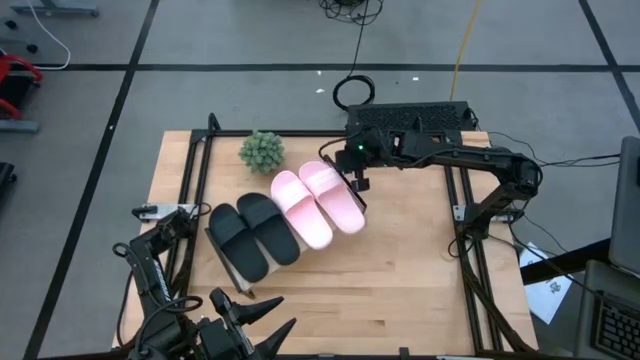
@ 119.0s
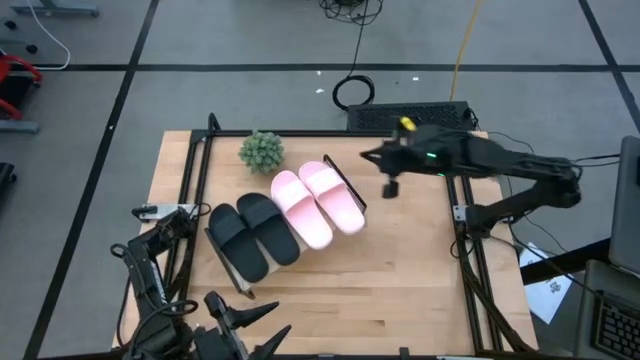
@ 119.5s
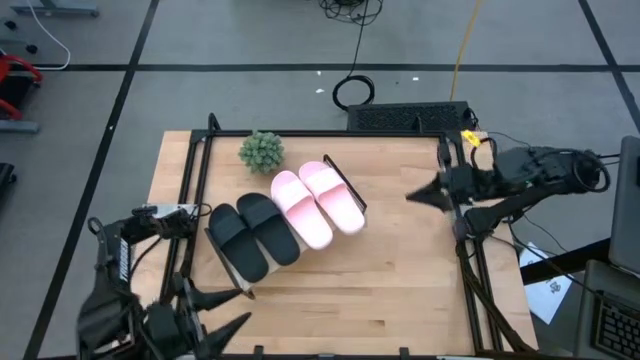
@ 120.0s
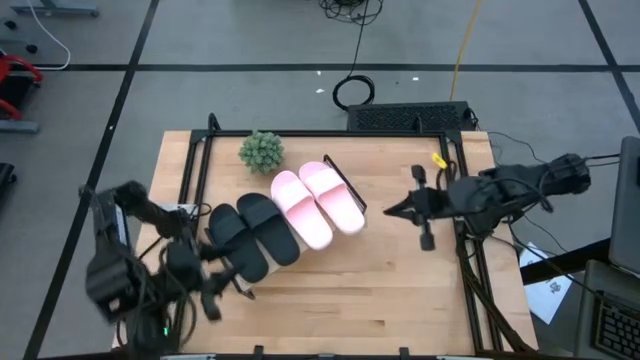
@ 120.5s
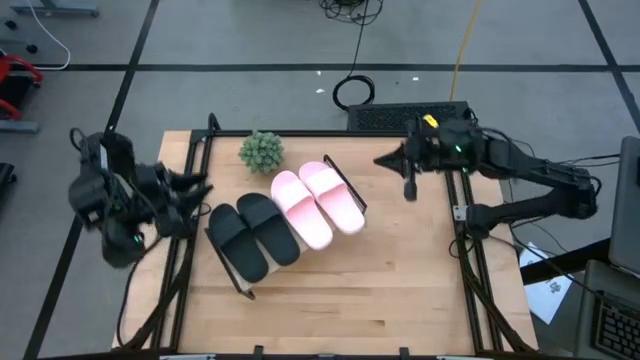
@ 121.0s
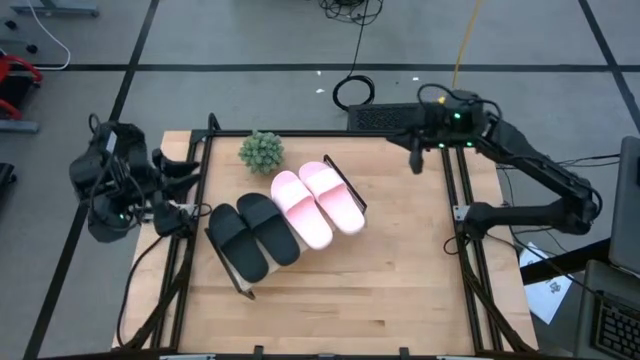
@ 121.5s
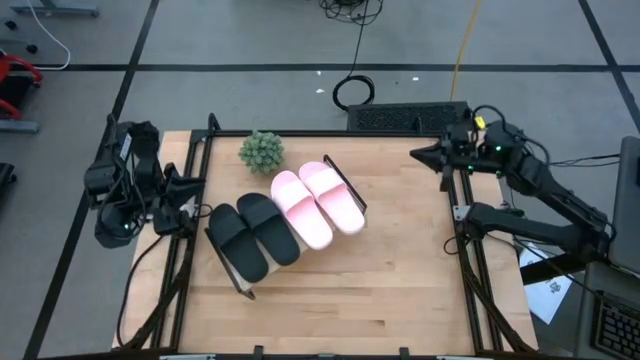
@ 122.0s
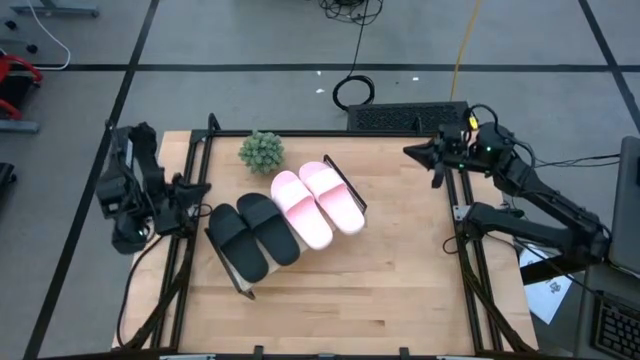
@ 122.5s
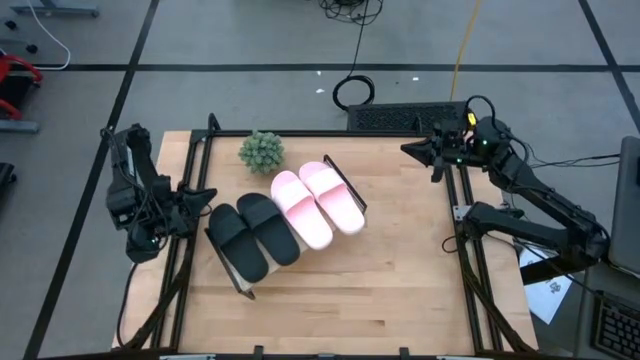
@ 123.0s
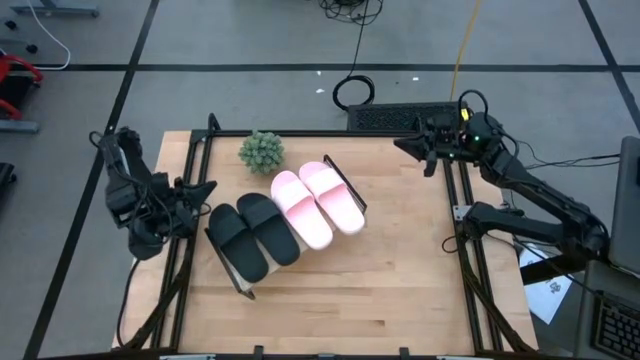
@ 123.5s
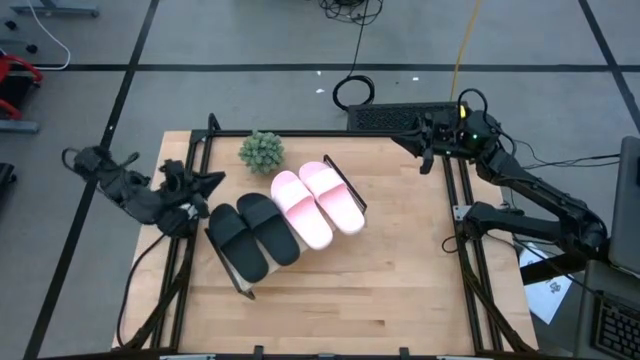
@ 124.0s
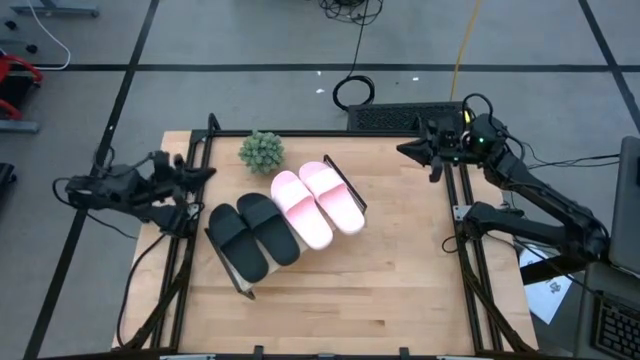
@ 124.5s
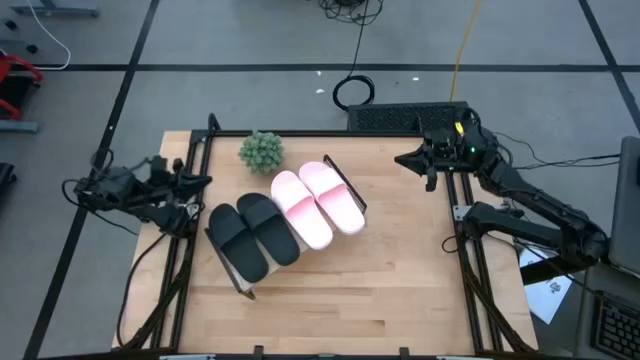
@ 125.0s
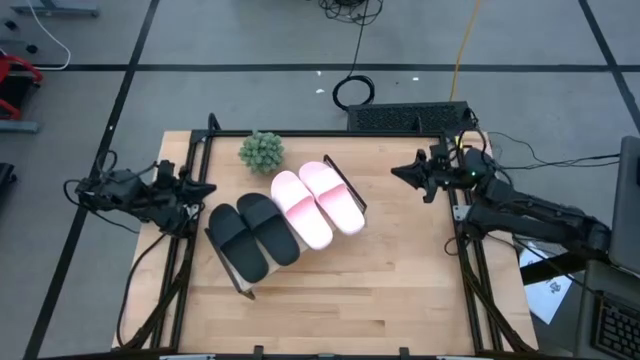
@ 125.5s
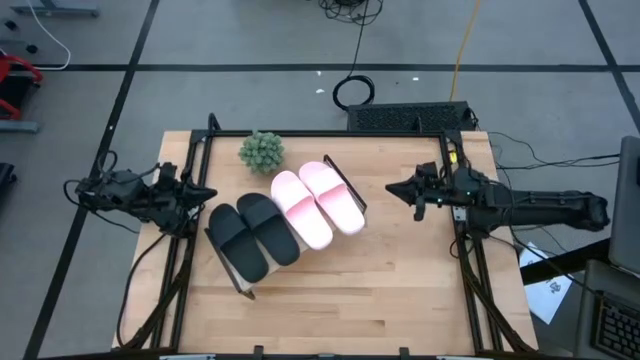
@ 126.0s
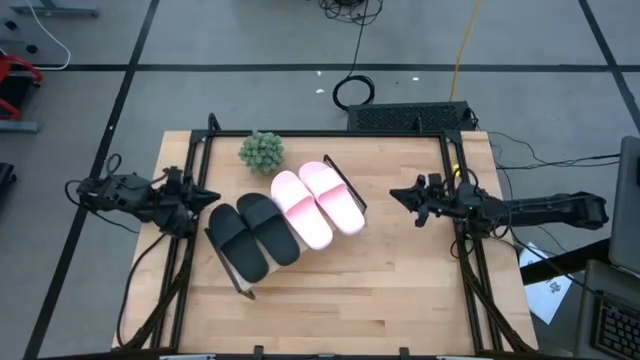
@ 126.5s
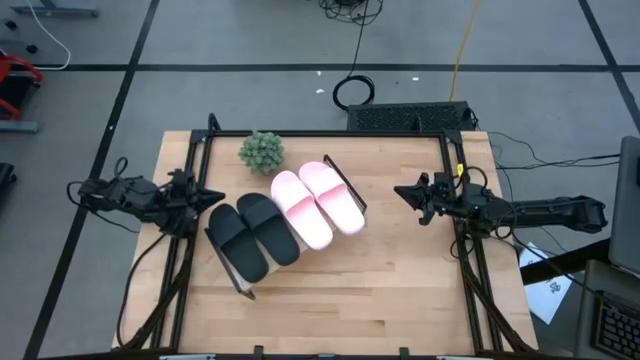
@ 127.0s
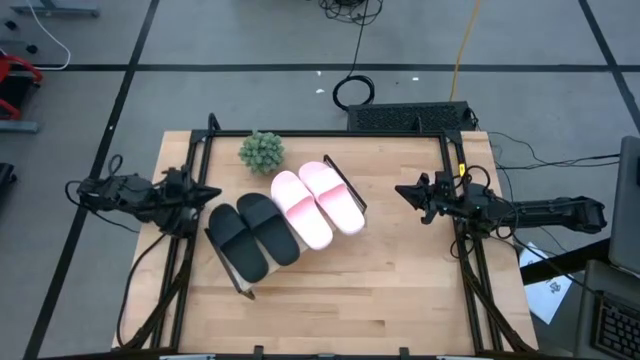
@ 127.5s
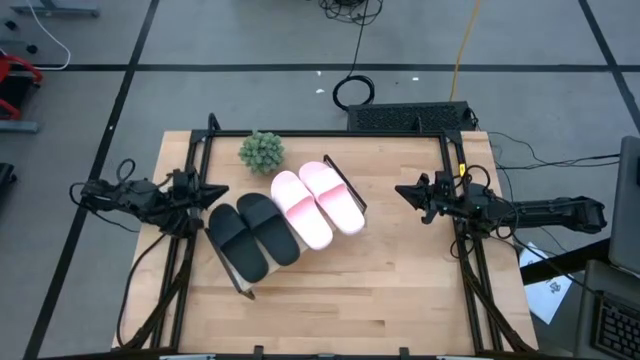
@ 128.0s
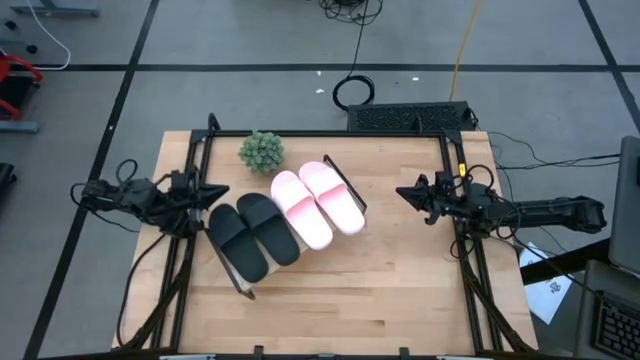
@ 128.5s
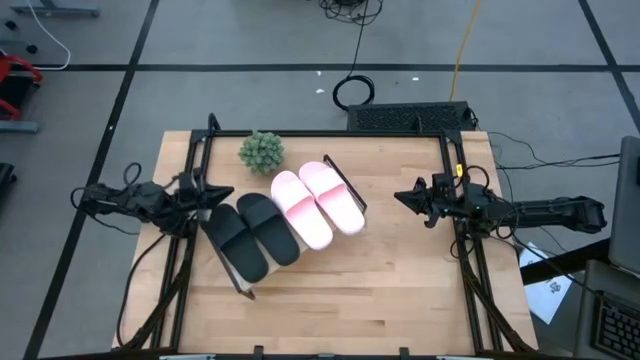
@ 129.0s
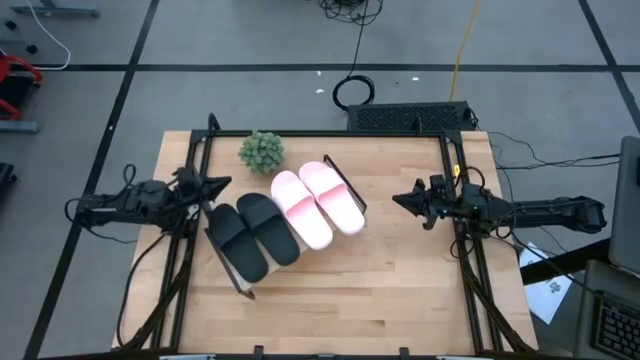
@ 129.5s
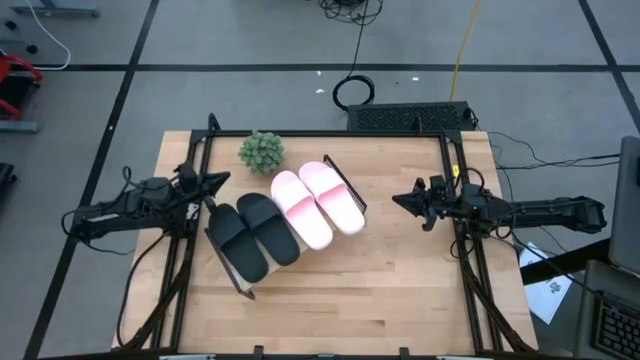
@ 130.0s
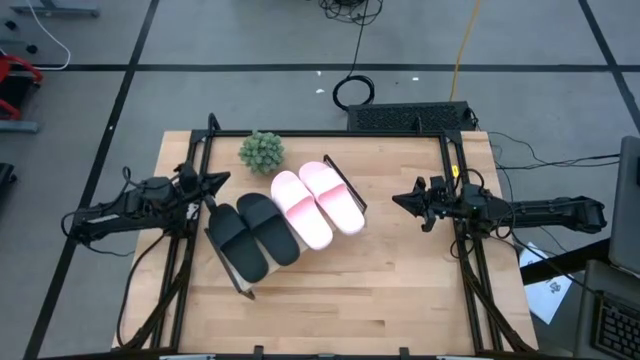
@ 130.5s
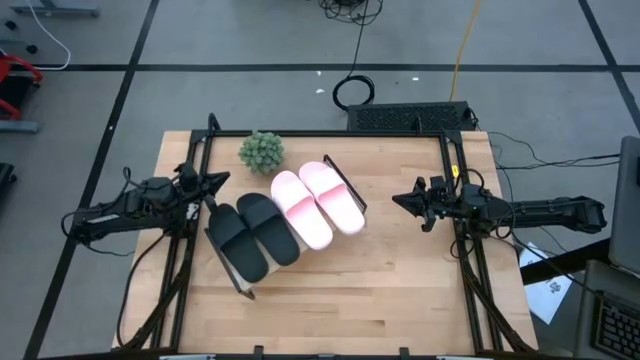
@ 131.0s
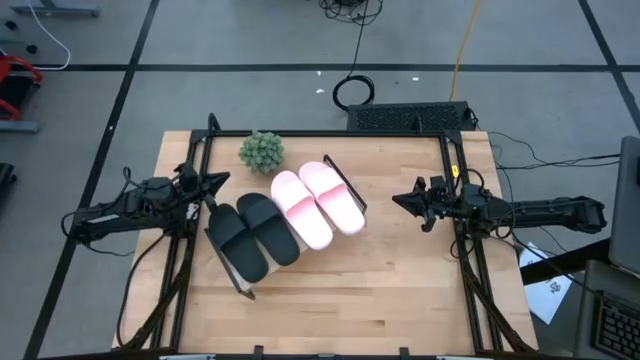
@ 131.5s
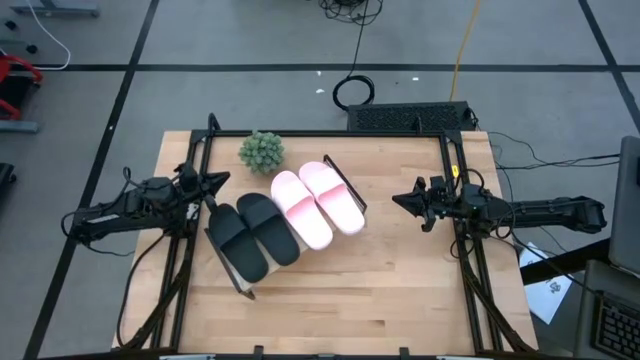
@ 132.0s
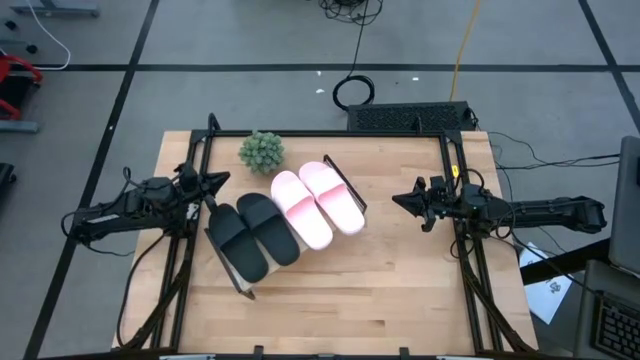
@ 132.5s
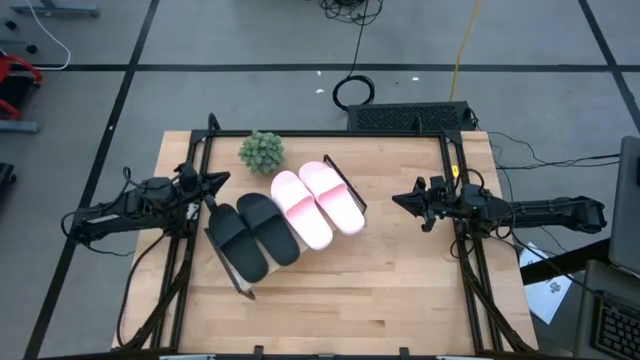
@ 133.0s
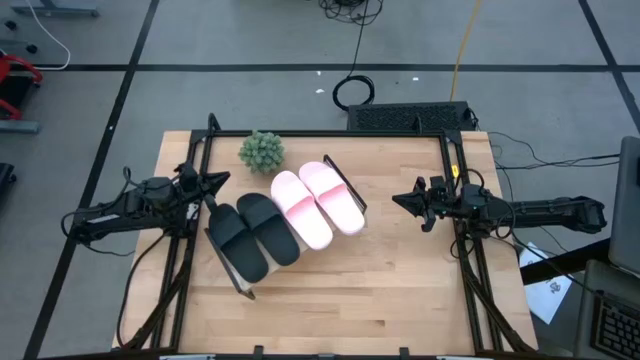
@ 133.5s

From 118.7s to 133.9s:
Task: Pick and place slides into the shelf
Return to Home Position

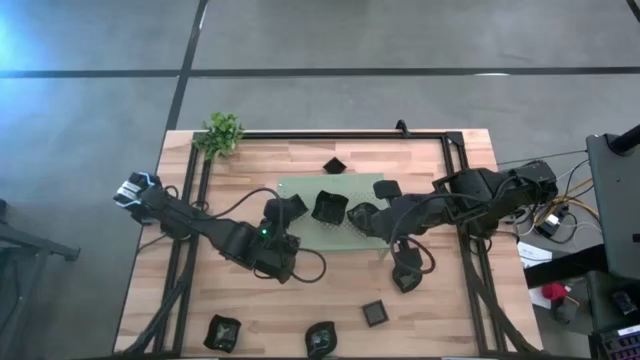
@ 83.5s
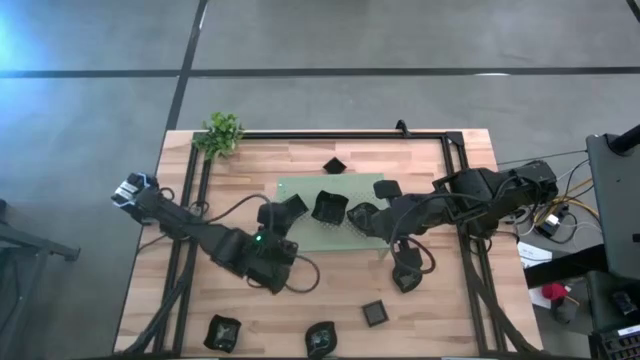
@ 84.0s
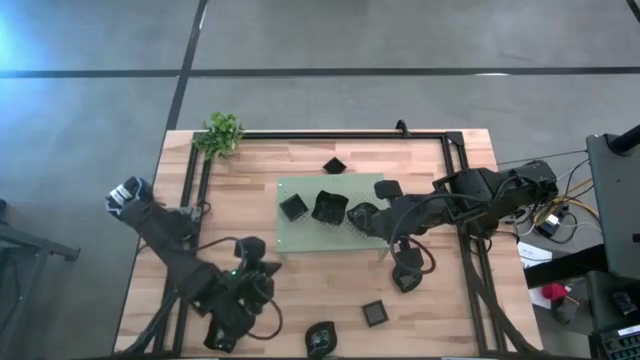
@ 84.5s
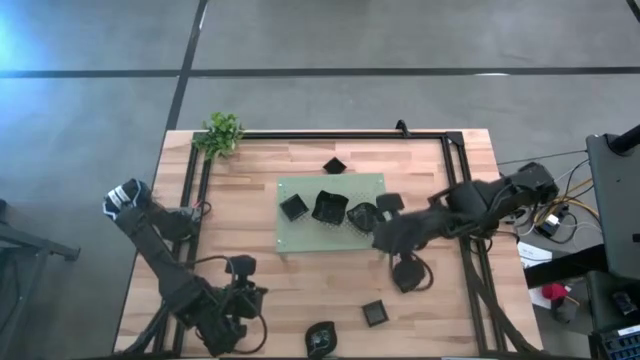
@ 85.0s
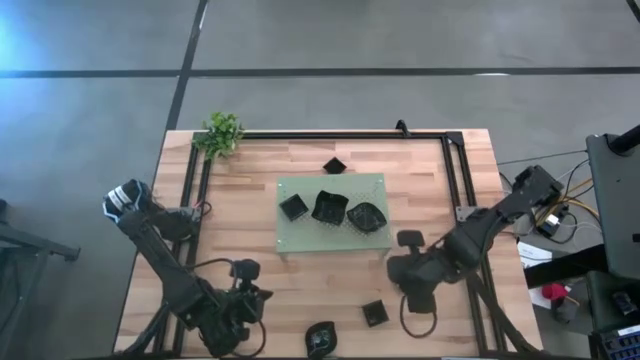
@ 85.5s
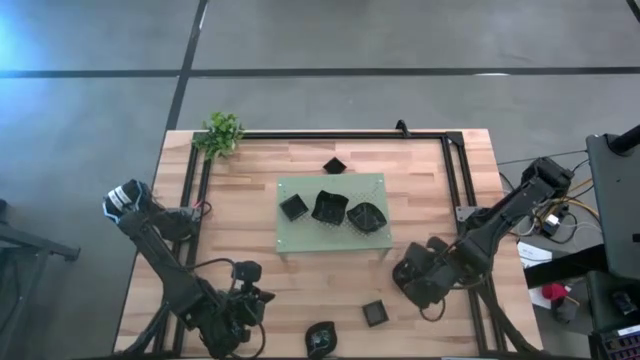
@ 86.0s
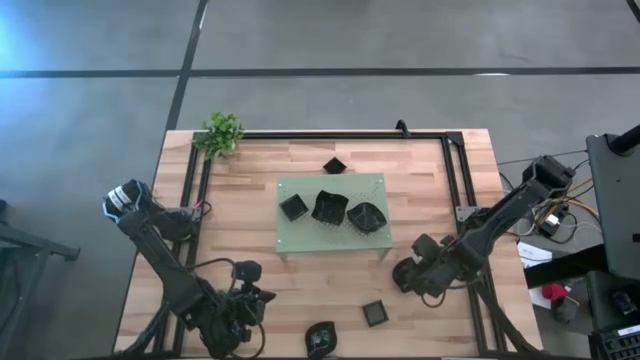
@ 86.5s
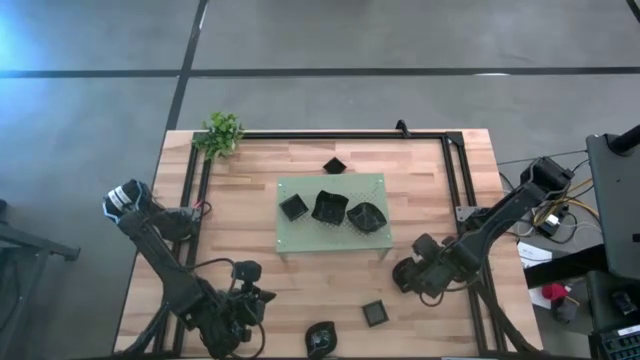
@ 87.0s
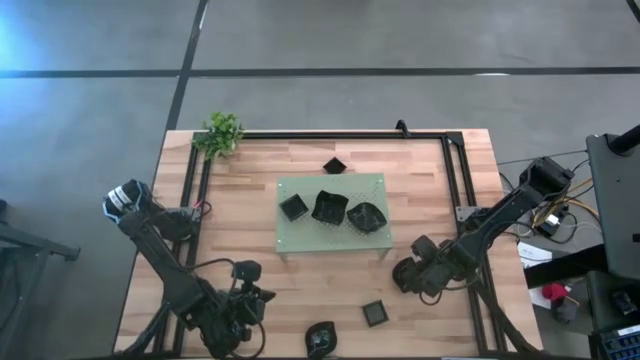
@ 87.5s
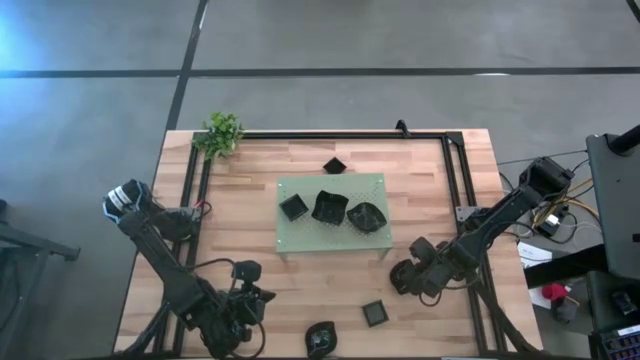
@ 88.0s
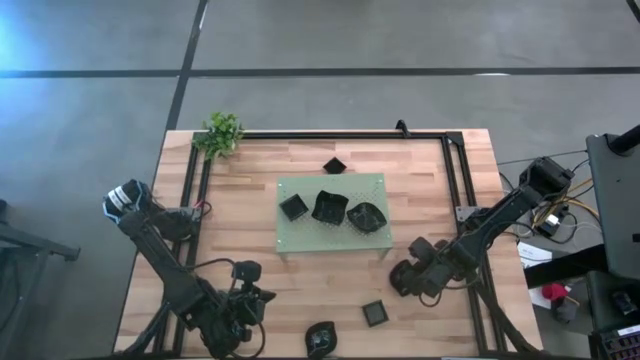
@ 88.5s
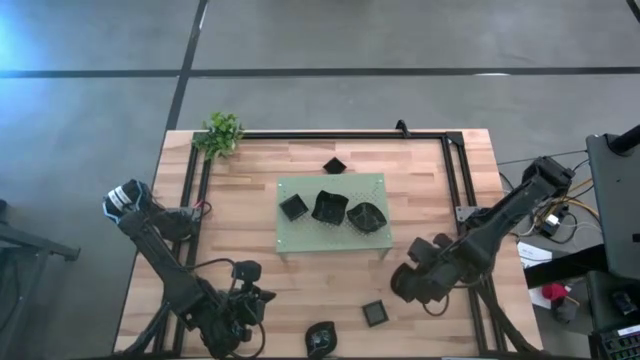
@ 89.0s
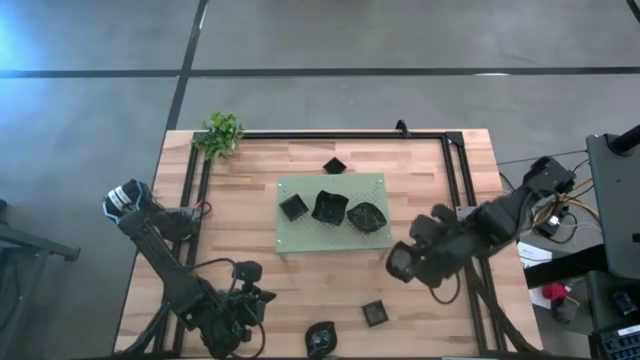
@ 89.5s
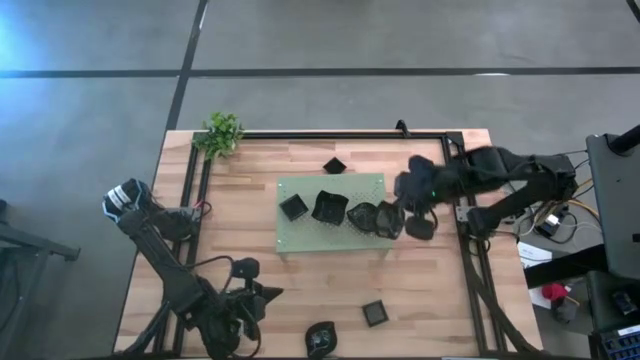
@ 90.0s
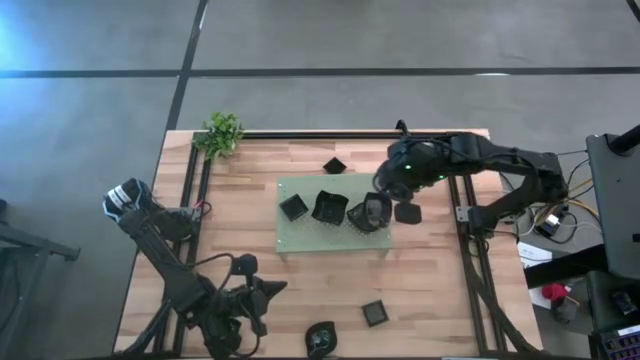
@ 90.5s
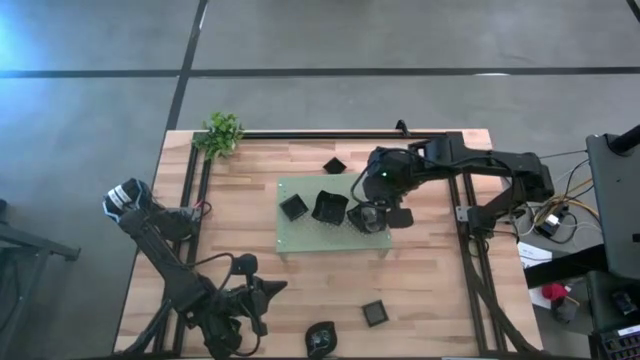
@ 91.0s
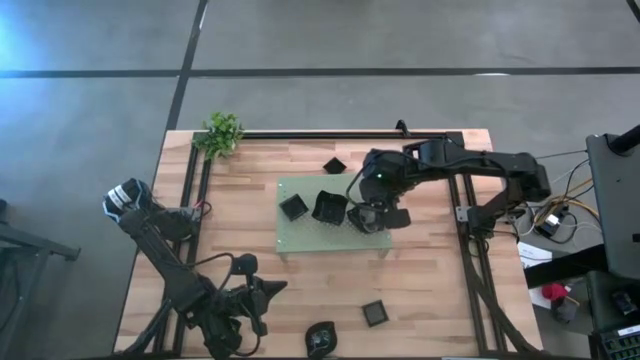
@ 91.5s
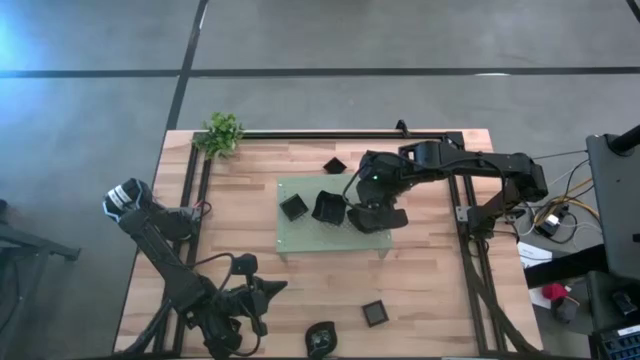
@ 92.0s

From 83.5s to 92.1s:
Task: Pick & Place Mini shaped plates
Stack the leaf shaped plate on top of the leaf shaped plates on the shelf
